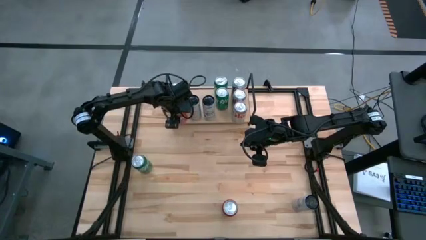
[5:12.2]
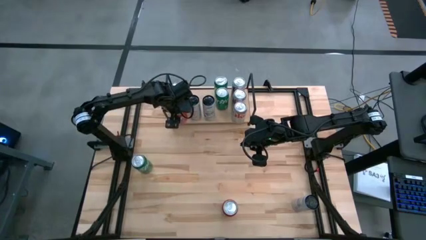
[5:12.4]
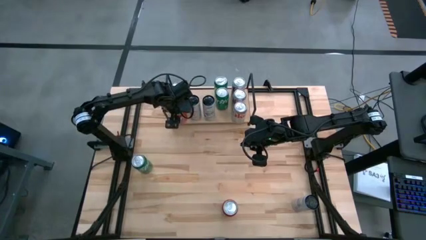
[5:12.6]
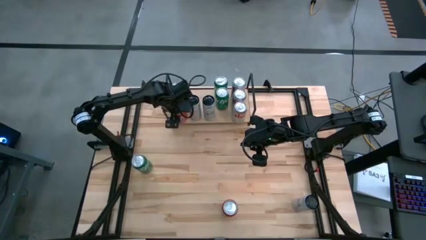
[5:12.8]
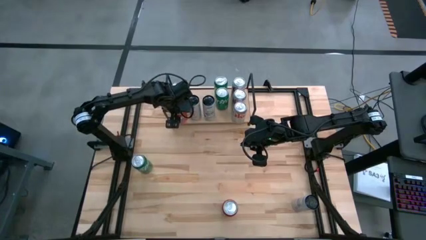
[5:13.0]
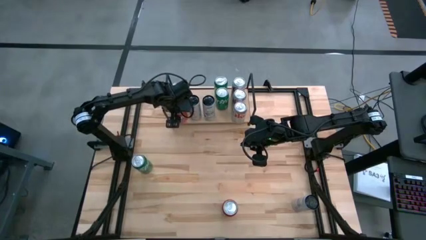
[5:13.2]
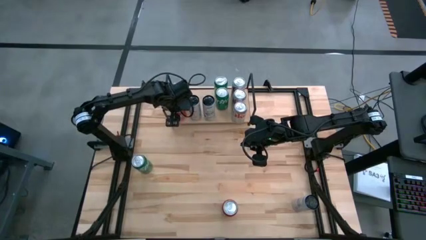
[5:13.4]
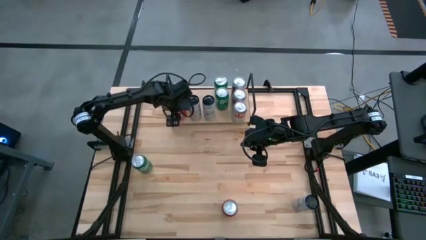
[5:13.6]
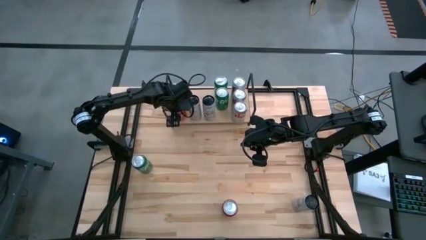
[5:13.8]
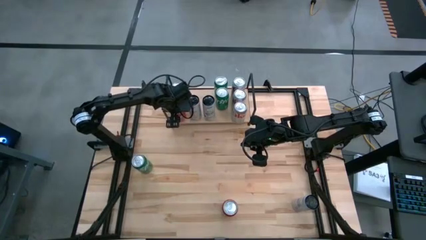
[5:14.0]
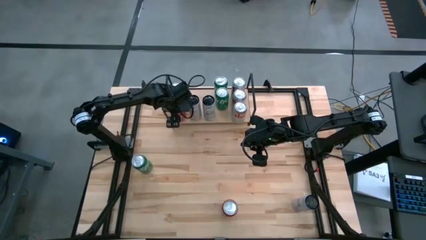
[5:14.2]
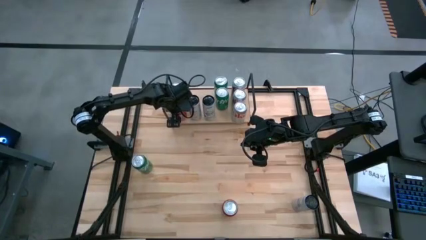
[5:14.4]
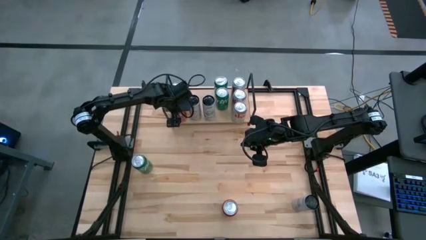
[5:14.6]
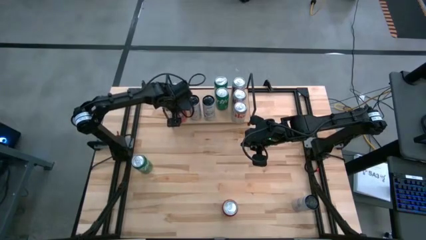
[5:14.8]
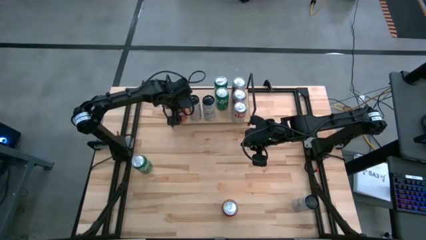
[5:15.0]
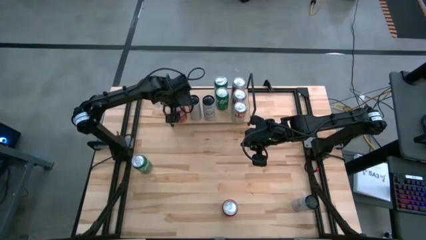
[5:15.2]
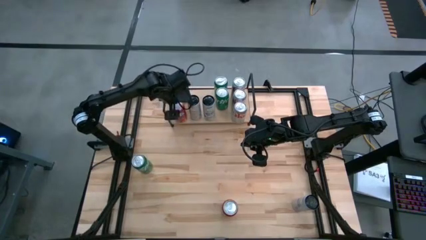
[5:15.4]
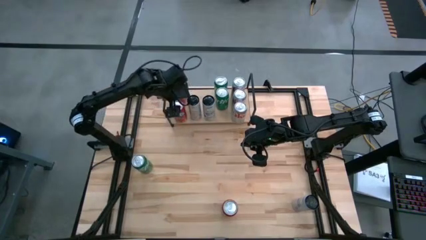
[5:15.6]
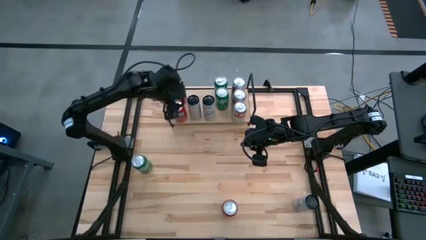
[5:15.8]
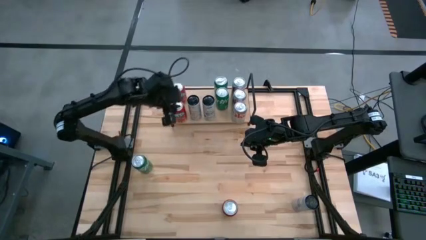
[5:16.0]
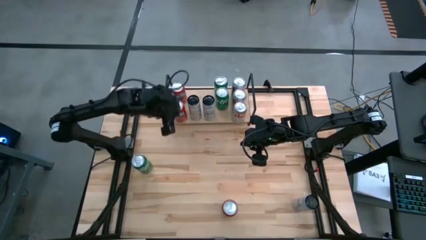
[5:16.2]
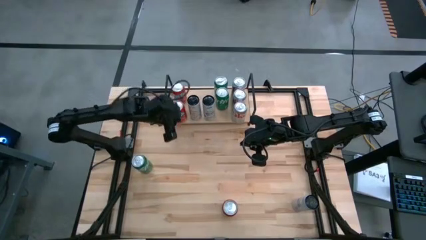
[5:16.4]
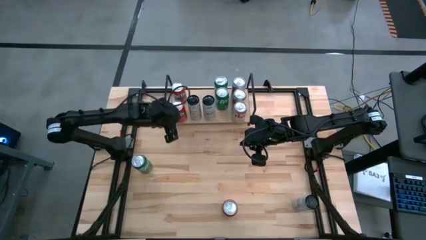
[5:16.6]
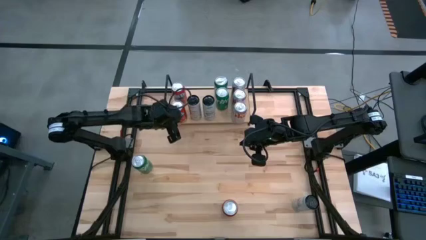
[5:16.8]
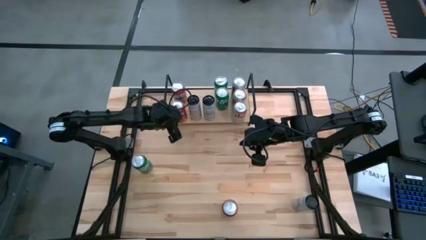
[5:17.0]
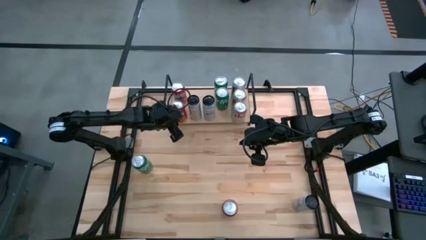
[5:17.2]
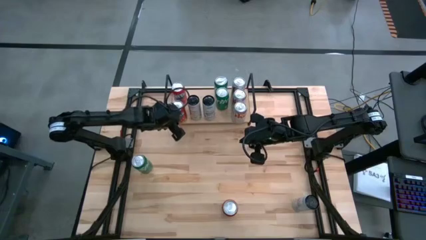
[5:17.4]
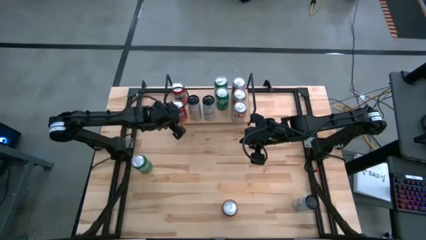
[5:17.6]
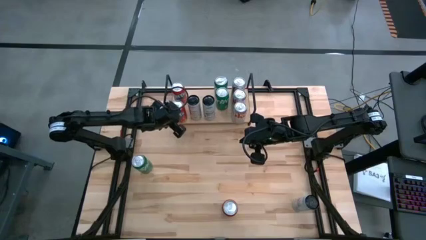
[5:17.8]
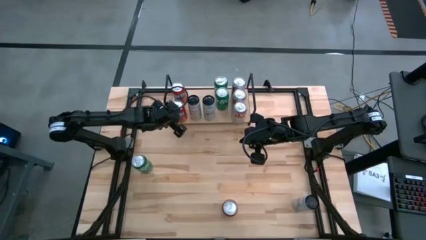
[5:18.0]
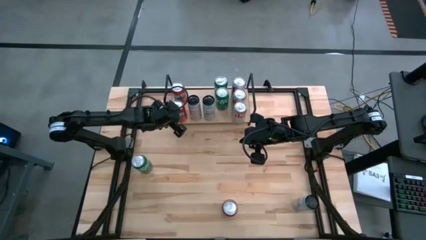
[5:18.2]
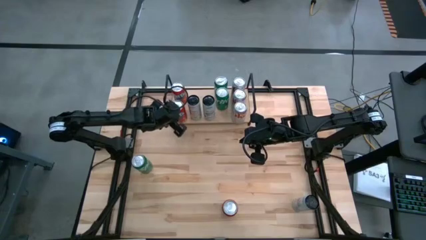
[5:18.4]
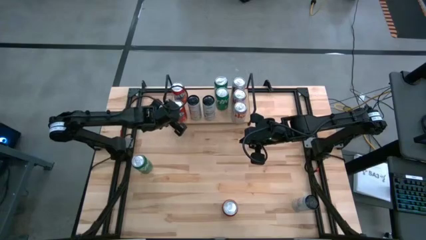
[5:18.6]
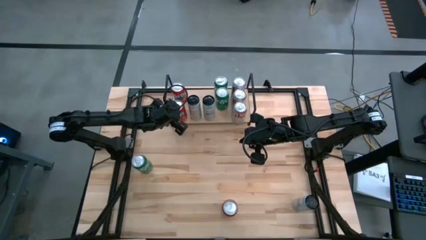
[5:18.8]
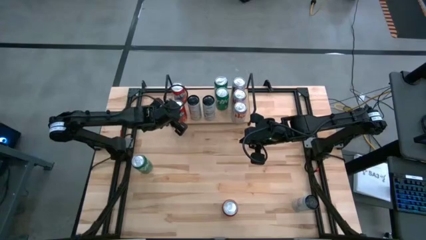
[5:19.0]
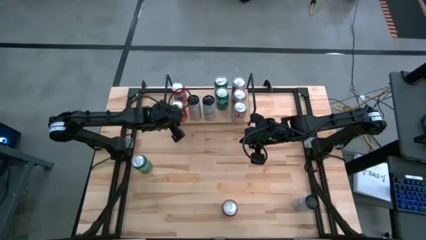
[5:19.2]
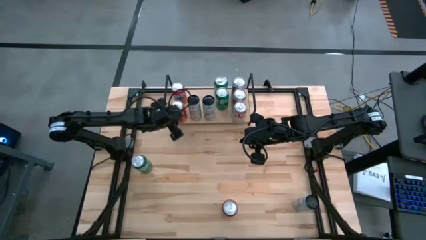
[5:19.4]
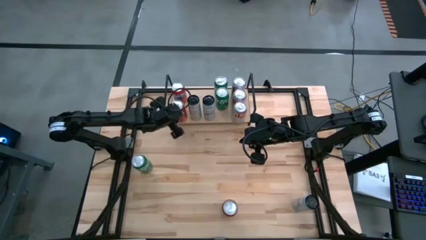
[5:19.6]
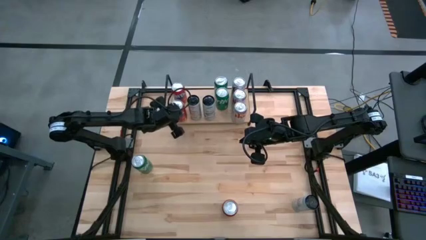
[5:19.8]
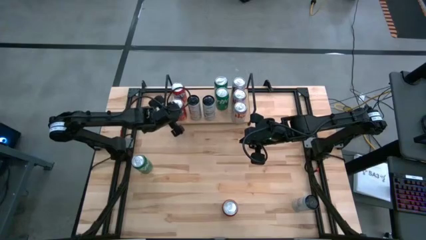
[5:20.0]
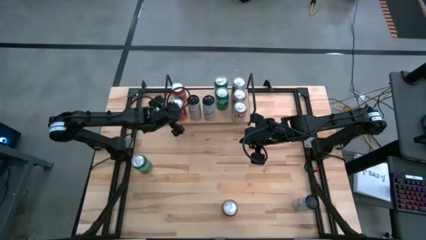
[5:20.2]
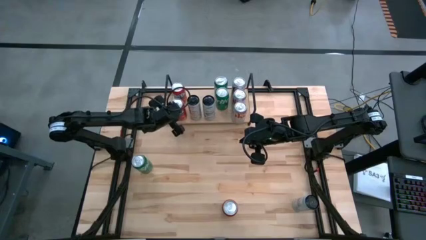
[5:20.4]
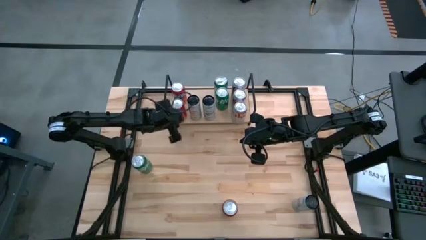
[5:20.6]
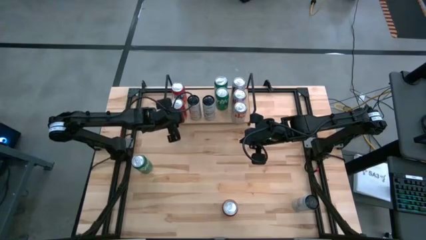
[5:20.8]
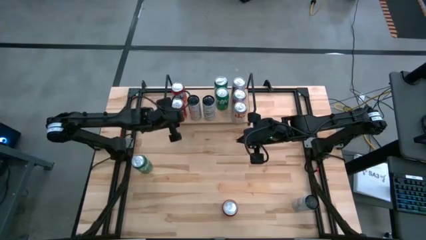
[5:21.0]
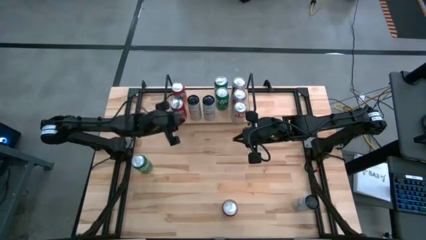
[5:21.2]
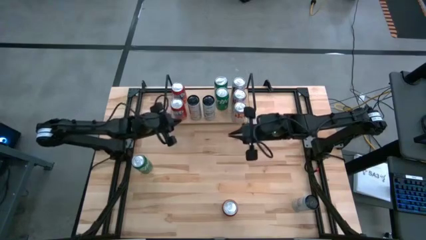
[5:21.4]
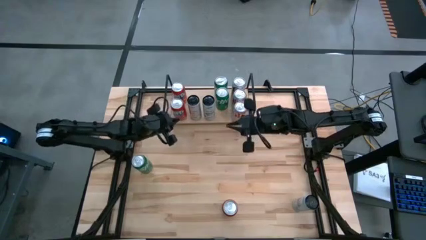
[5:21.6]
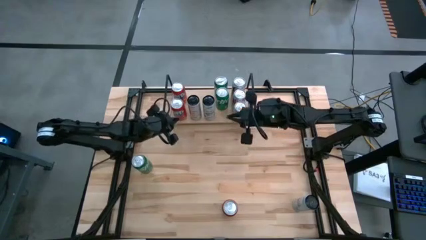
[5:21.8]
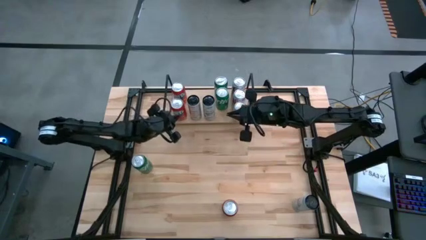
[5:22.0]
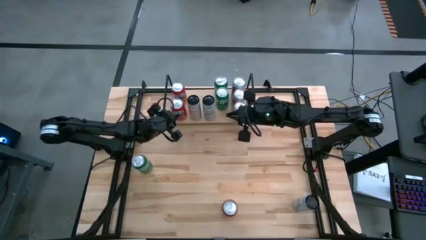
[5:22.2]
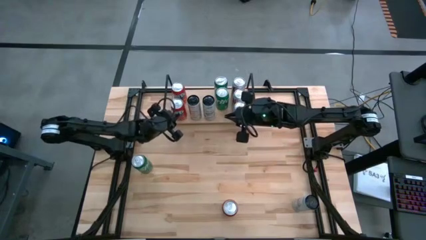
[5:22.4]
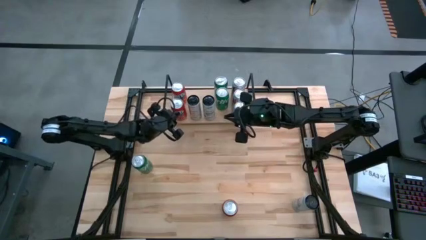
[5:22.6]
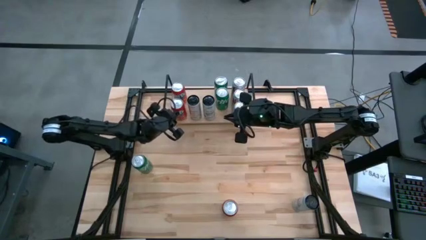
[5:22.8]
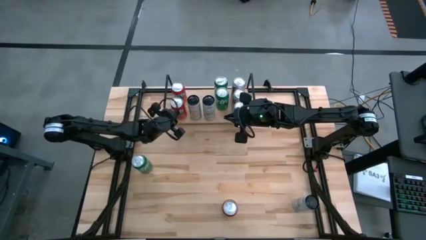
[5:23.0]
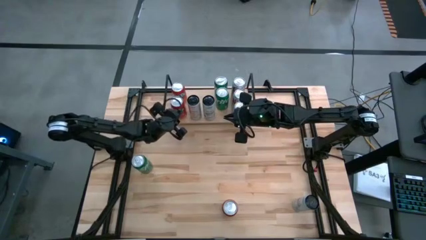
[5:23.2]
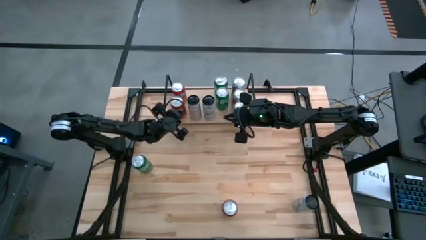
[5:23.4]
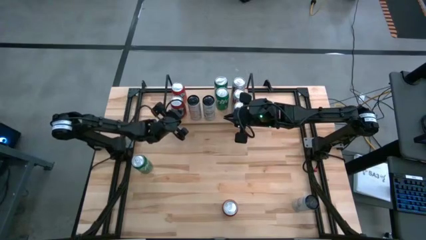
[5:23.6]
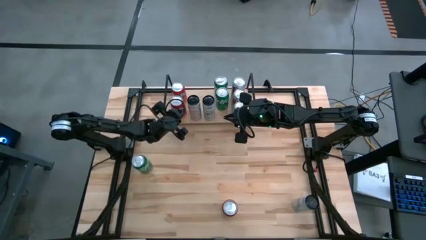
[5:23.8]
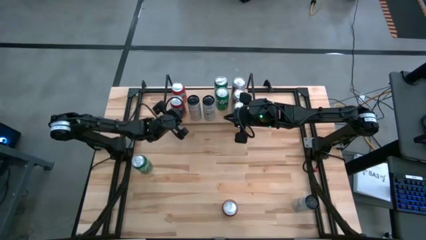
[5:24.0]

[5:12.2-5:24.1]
Task: Sort soda cans
Put the left red soda can on the shelf and align it with the other red soda can
